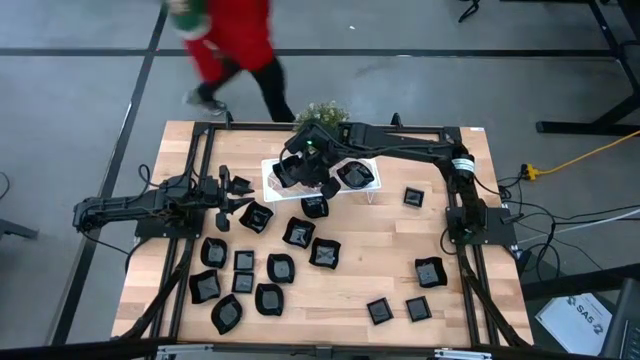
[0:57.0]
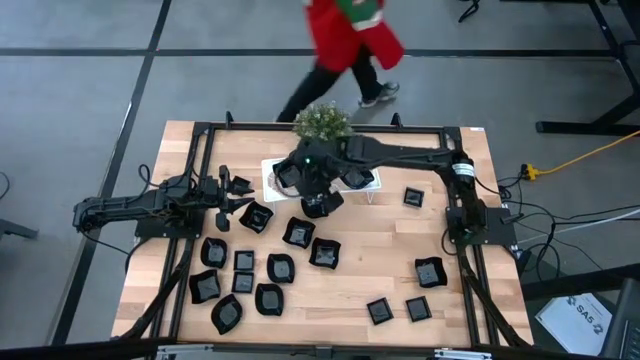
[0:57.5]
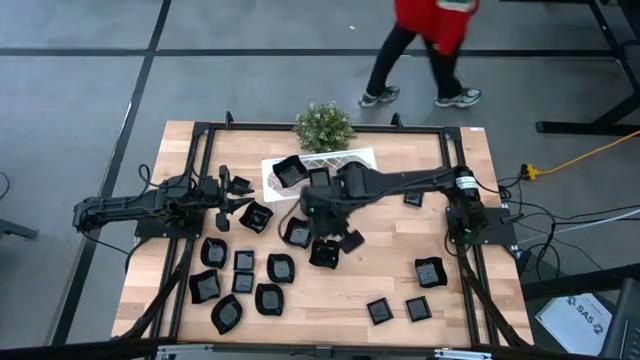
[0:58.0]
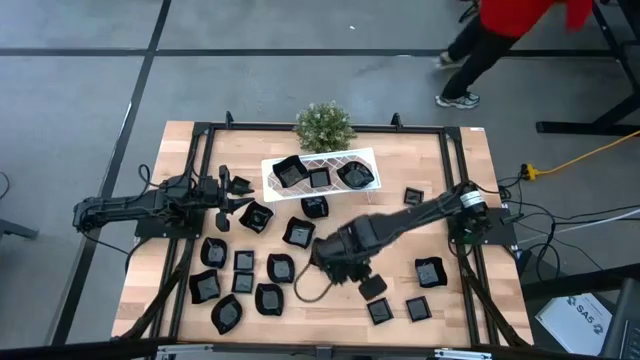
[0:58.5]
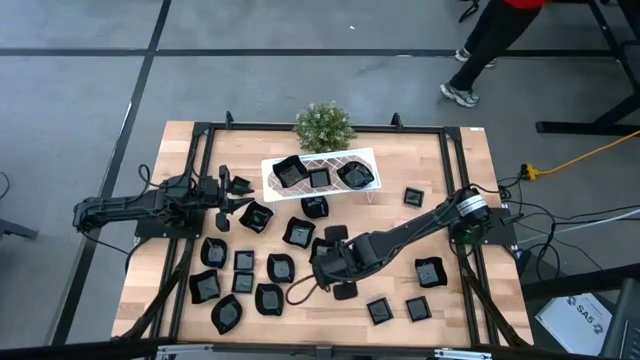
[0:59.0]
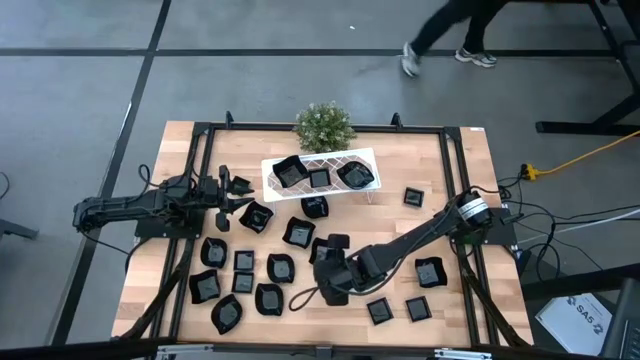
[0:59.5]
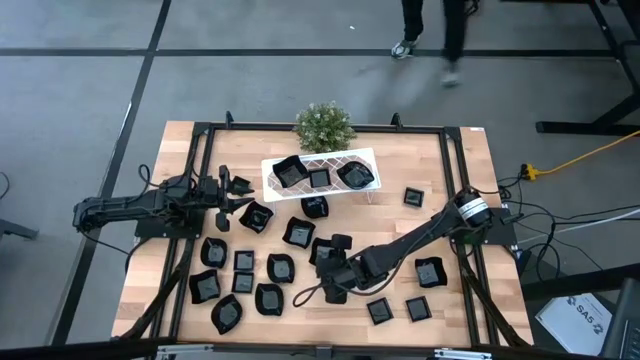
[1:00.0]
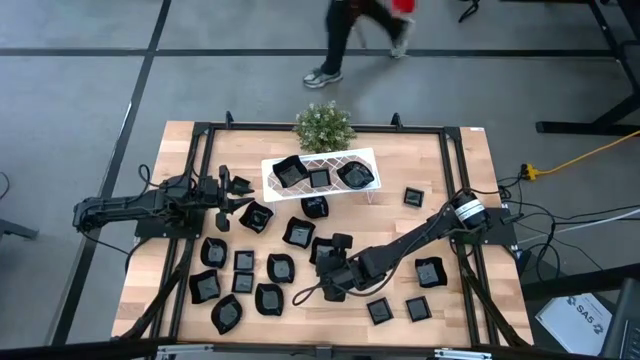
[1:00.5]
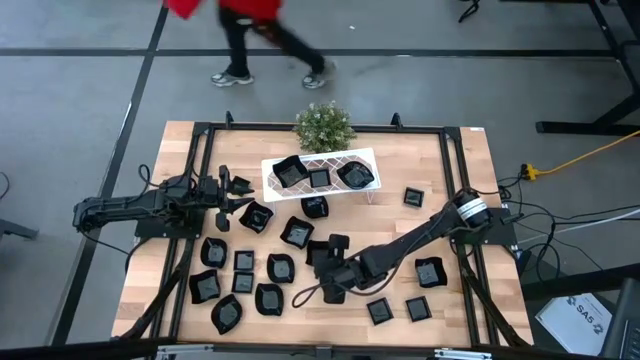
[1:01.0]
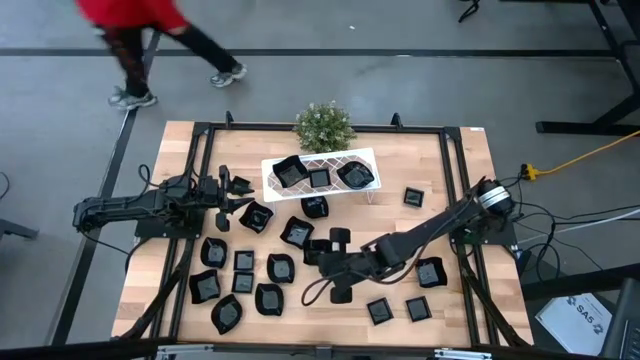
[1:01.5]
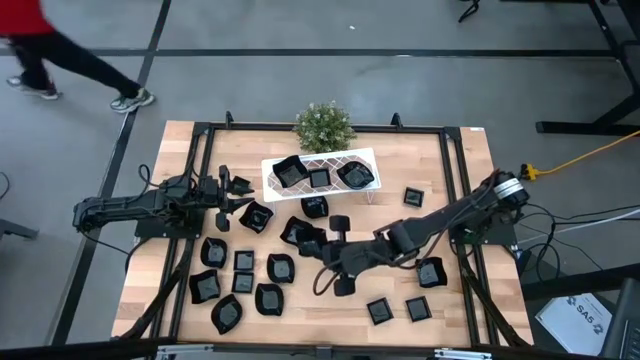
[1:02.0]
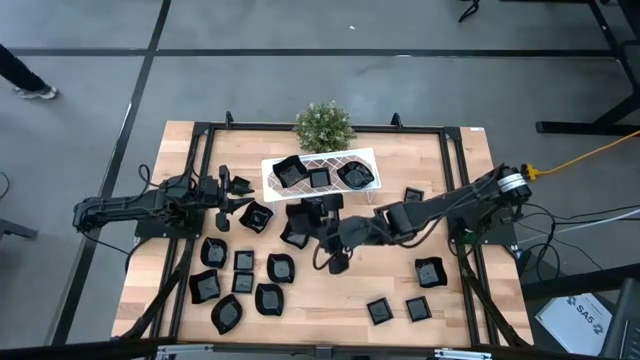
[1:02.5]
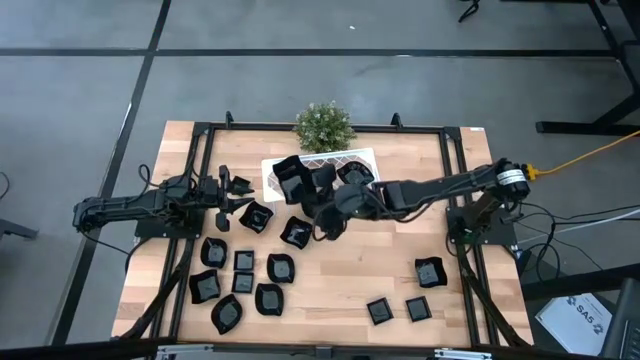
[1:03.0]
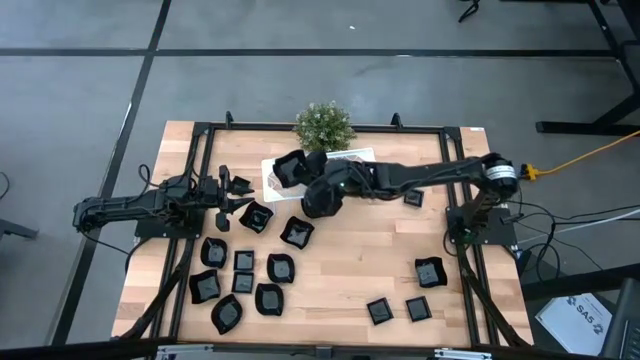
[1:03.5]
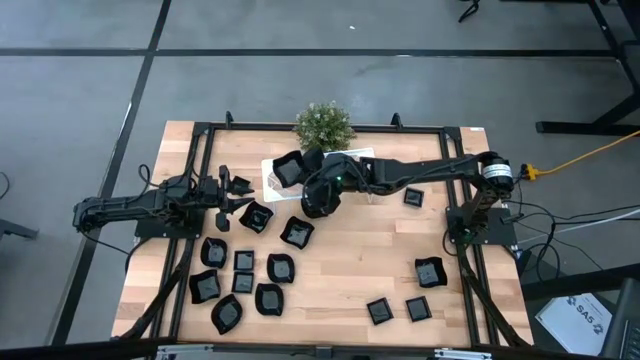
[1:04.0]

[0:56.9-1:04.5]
Task: Pick & Place Mini shaped plates
Stack the distorted square plate on top of the distorted square plate on the shelf

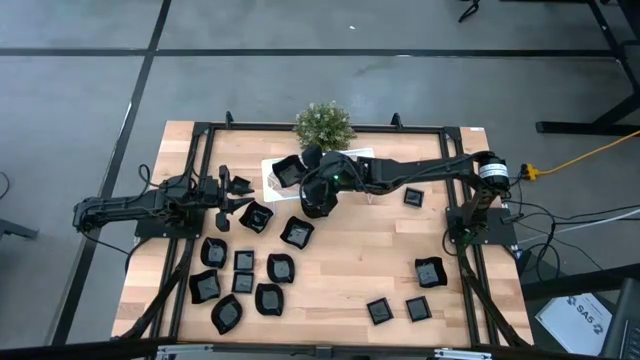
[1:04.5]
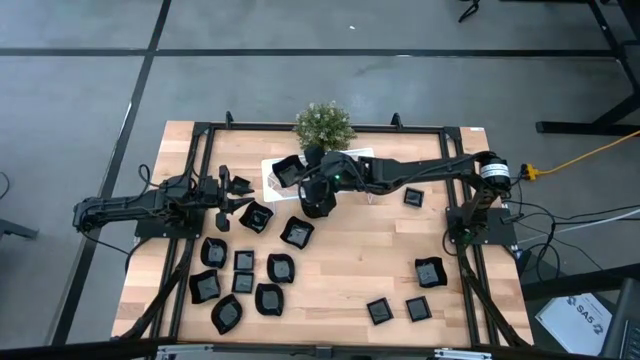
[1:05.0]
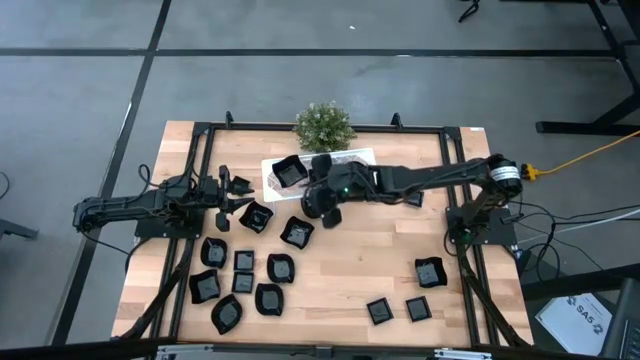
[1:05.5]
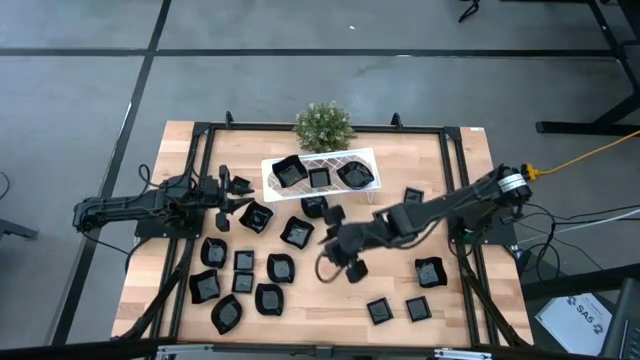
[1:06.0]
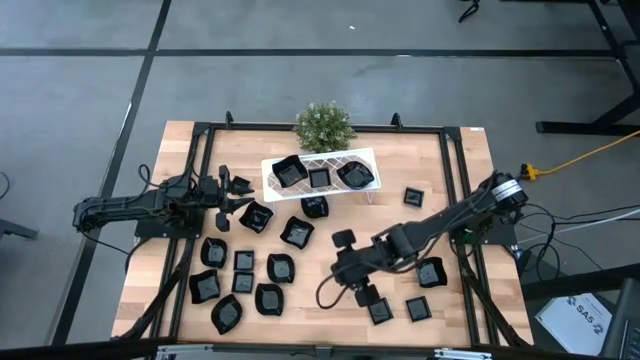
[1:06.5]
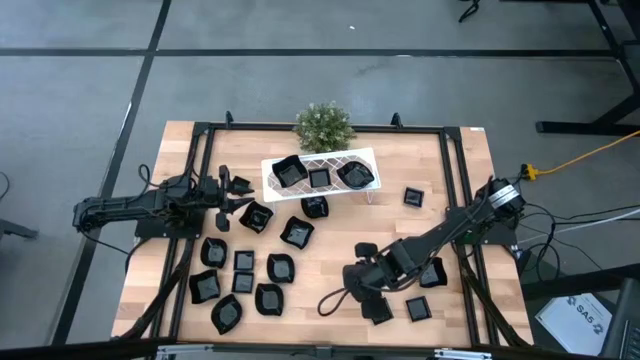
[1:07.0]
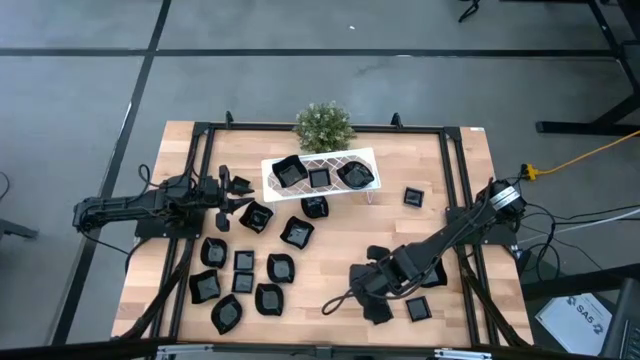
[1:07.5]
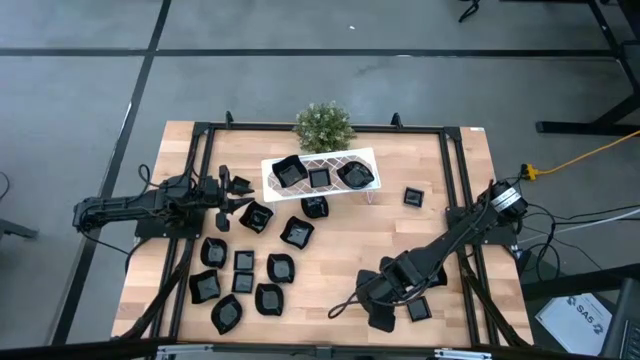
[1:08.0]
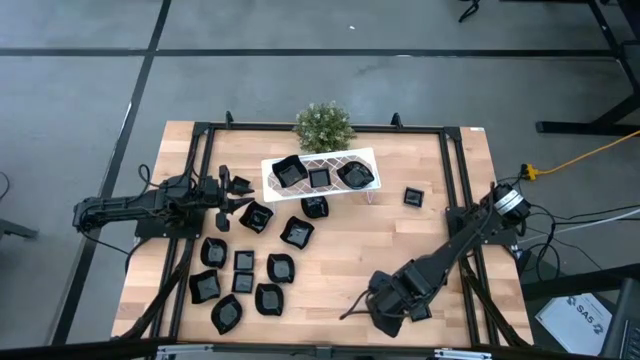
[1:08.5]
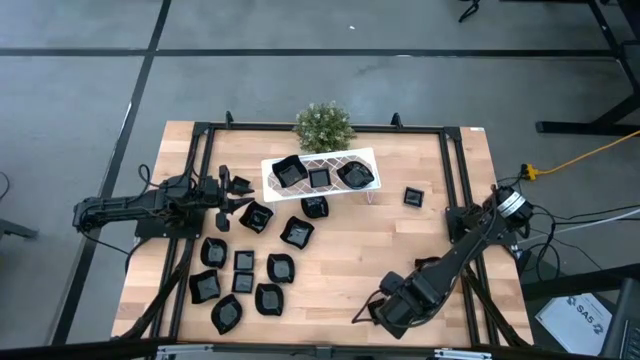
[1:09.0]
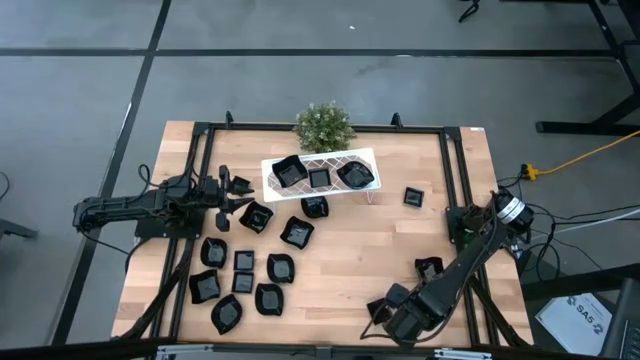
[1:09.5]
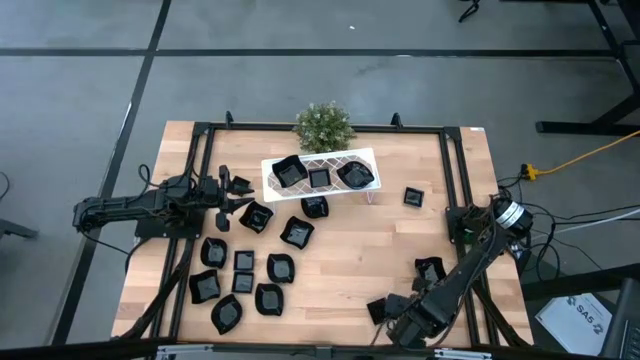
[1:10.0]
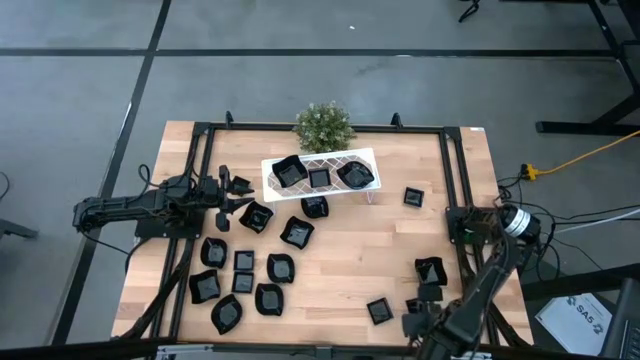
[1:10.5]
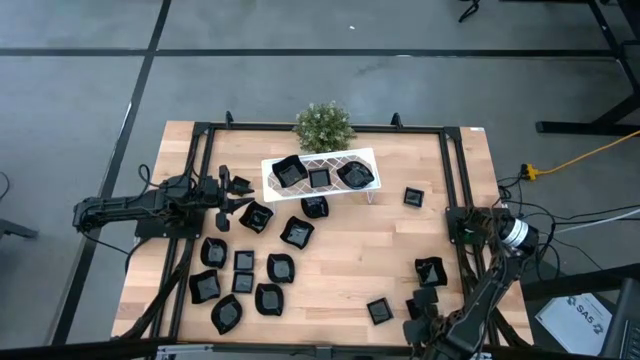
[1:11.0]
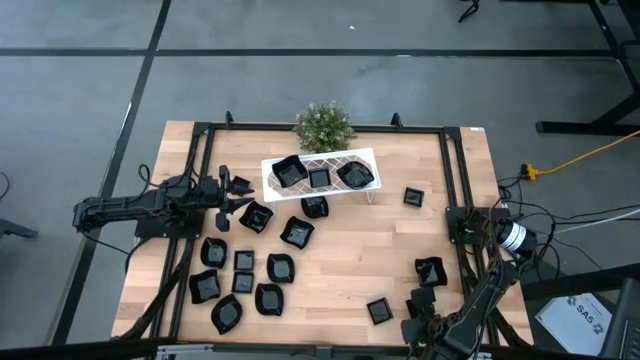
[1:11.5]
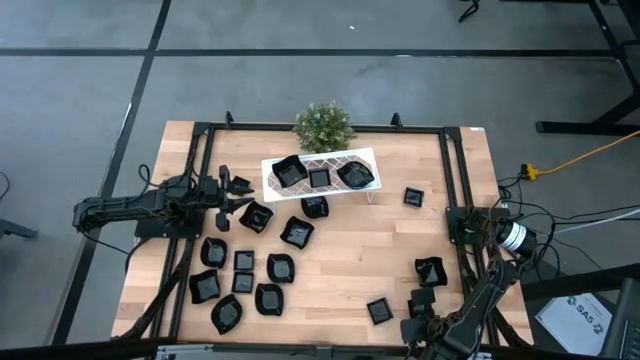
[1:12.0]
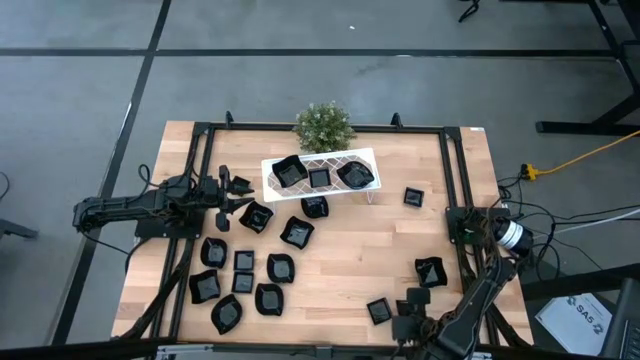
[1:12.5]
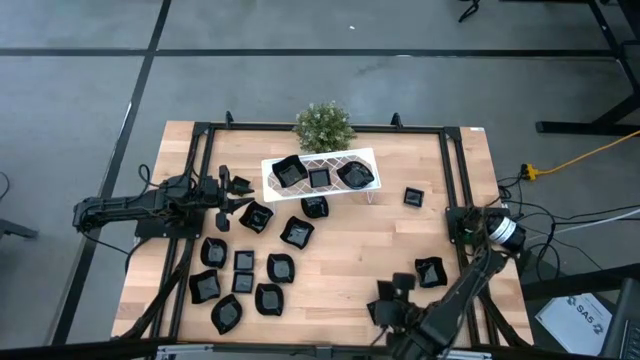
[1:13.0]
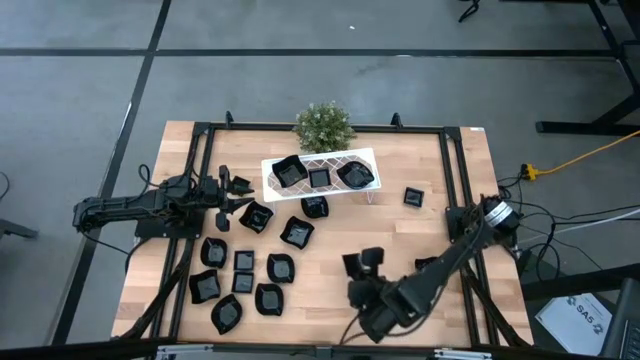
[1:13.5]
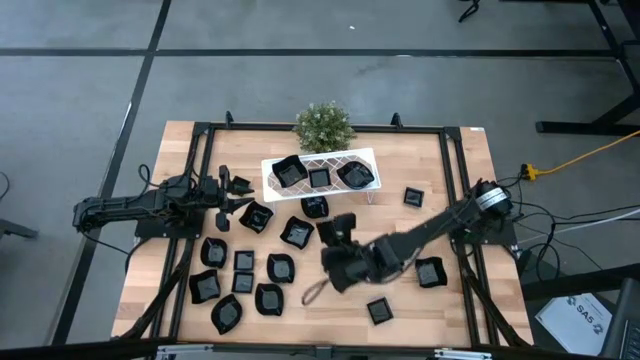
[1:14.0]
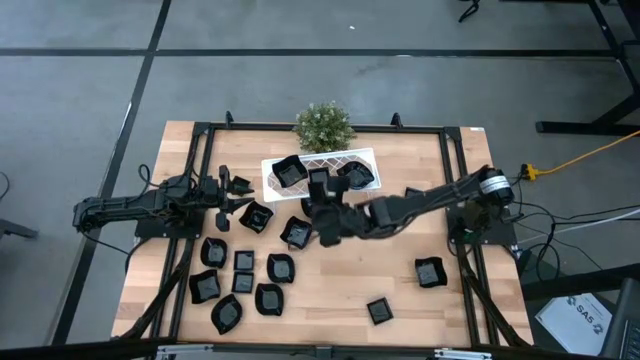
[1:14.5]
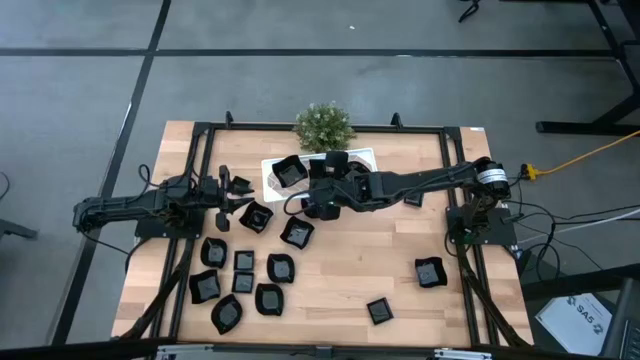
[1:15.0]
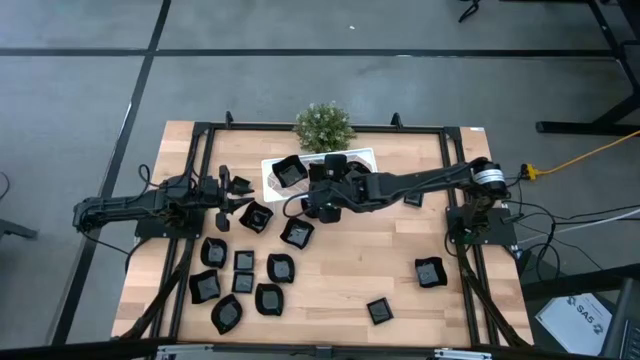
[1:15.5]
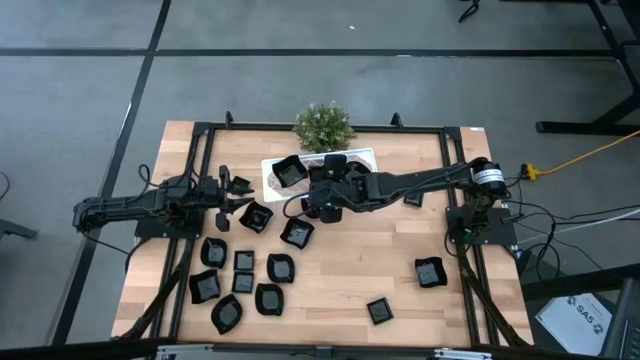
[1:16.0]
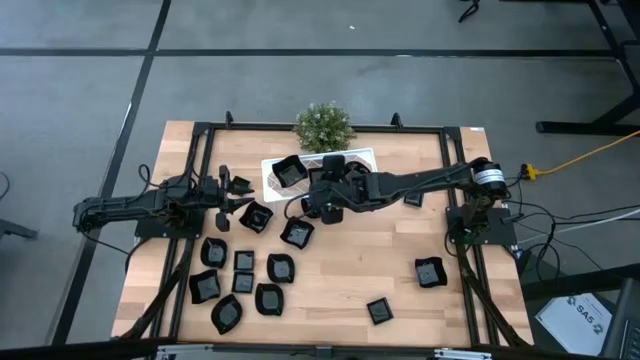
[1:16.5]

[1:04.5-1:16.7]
Stack the square plate on top of the square plate on the shelf

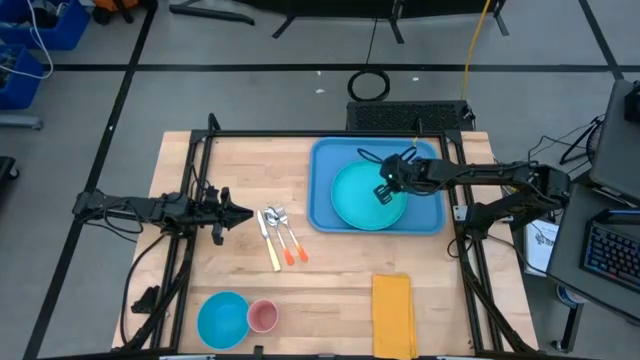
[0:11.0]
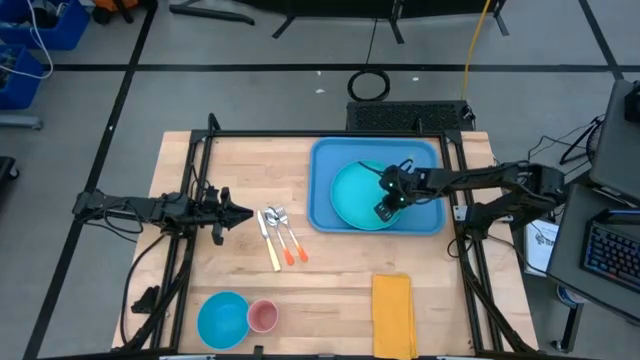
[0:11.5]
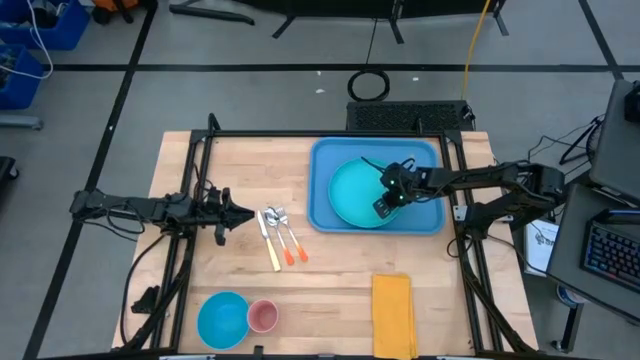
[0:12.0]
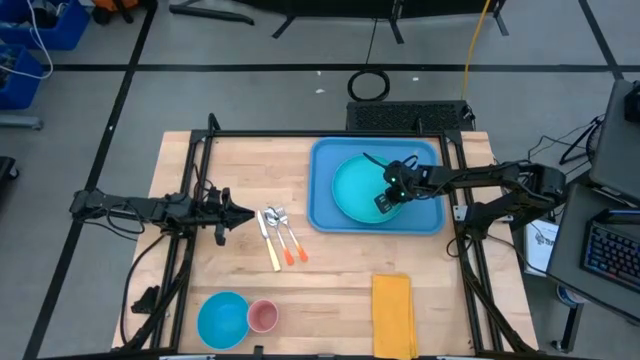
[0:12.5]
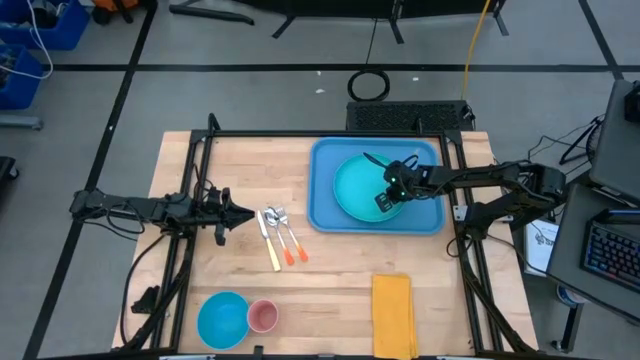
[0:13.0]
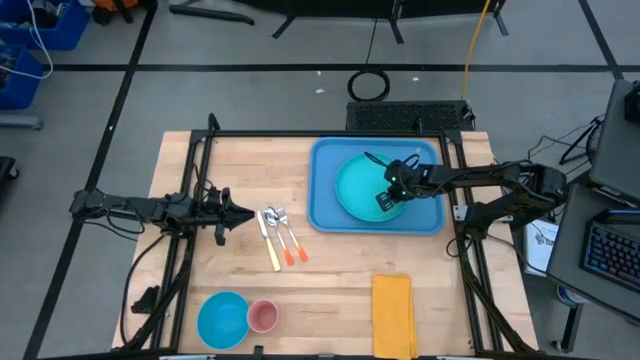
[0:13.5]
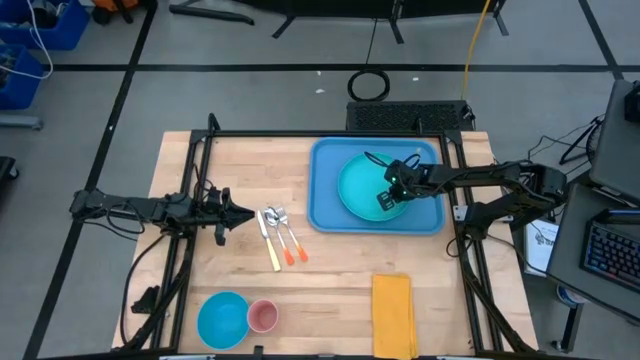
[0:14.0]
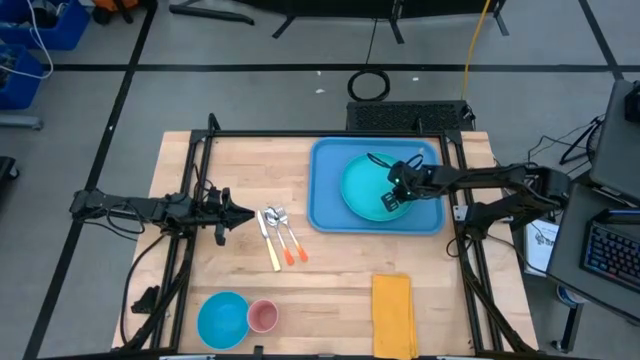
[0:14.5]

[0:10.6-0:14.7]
Task: Set up tray
Move the light blue plate to the center of the blue tray
